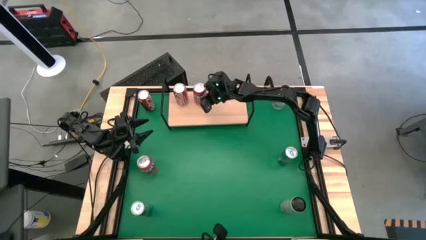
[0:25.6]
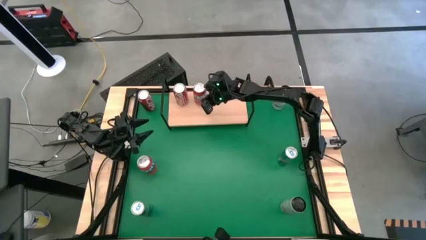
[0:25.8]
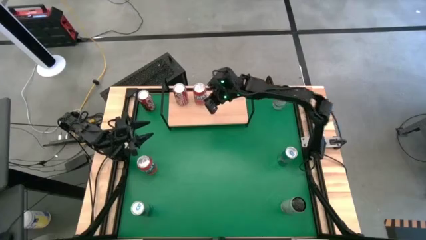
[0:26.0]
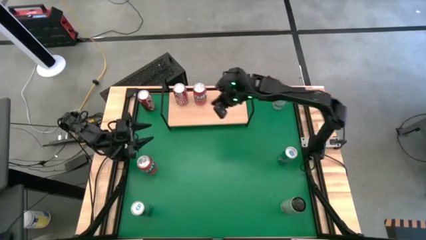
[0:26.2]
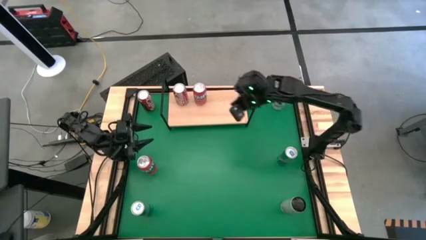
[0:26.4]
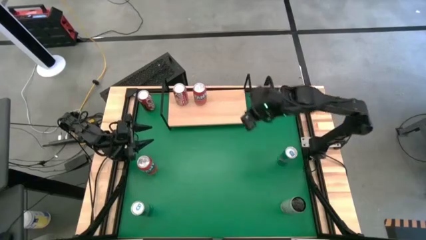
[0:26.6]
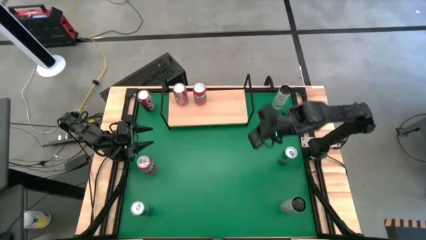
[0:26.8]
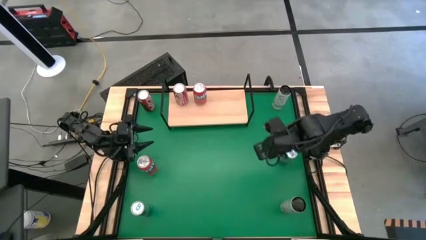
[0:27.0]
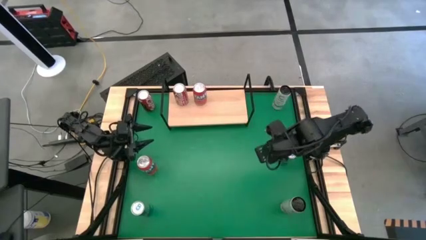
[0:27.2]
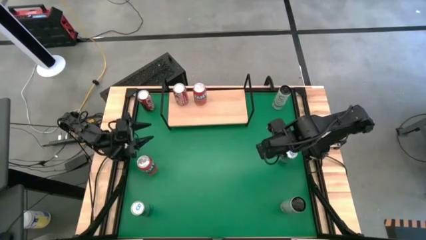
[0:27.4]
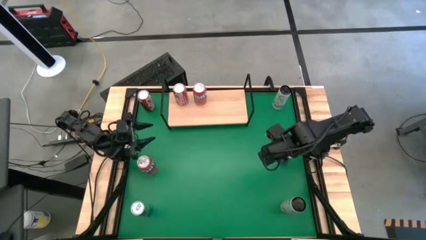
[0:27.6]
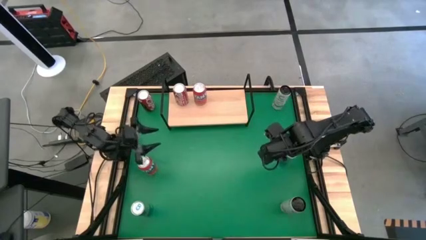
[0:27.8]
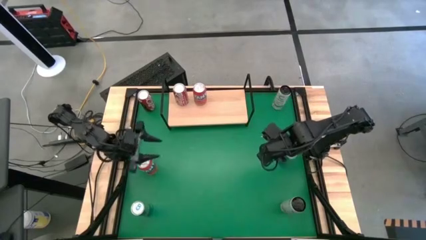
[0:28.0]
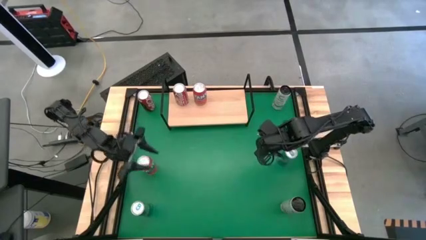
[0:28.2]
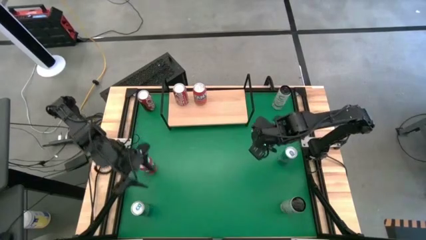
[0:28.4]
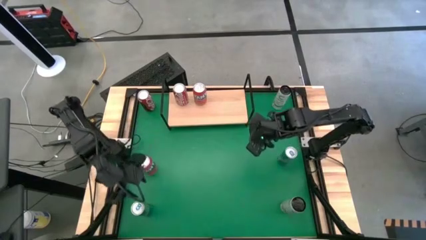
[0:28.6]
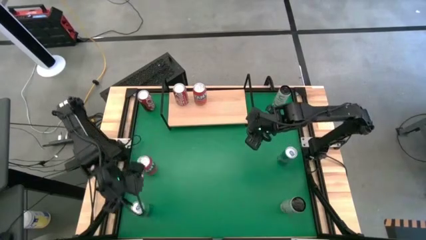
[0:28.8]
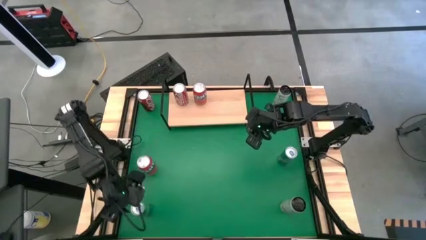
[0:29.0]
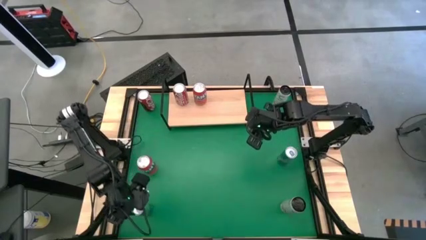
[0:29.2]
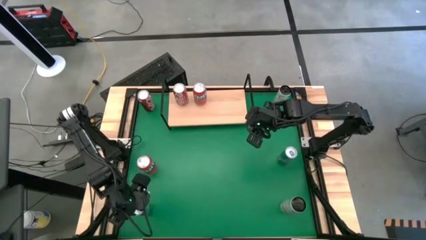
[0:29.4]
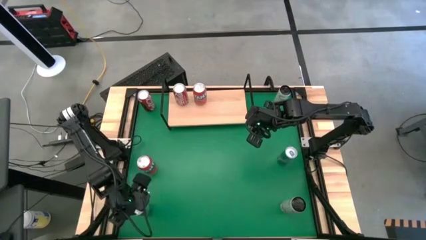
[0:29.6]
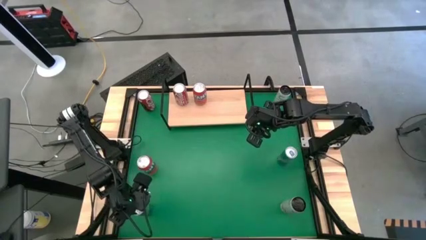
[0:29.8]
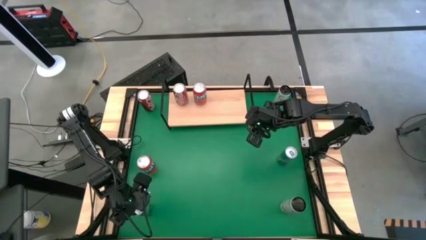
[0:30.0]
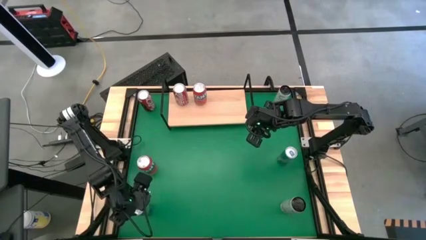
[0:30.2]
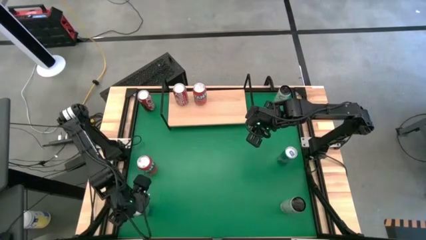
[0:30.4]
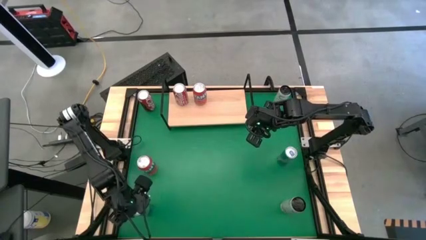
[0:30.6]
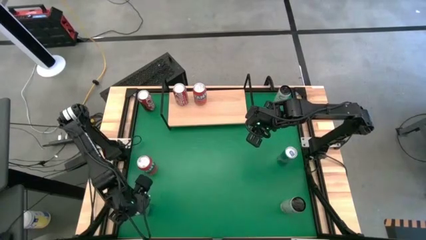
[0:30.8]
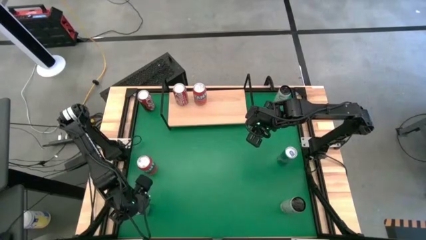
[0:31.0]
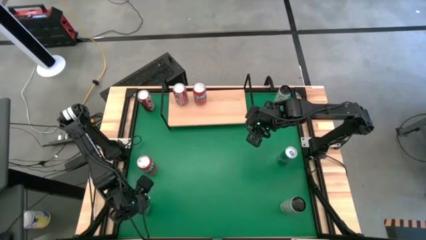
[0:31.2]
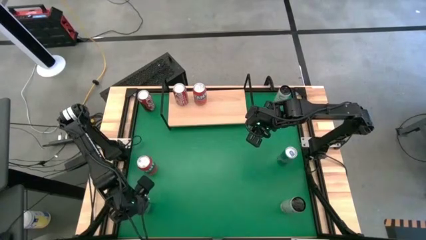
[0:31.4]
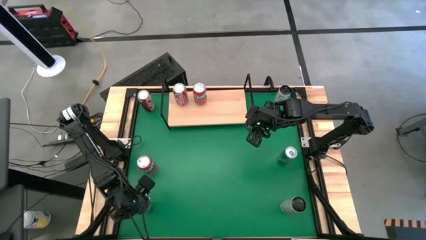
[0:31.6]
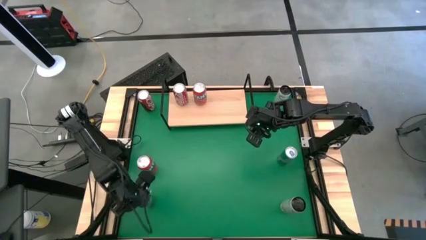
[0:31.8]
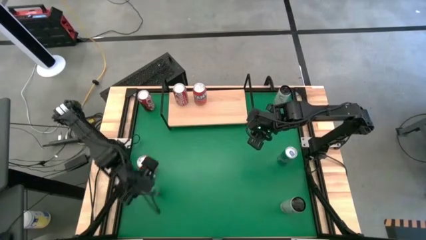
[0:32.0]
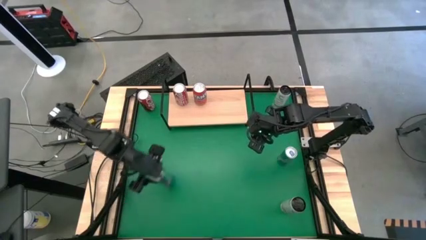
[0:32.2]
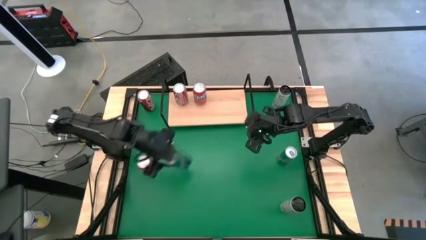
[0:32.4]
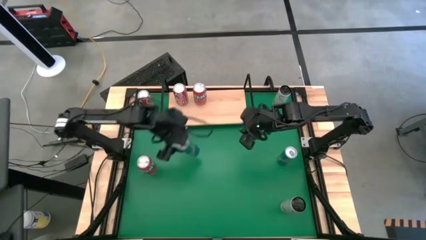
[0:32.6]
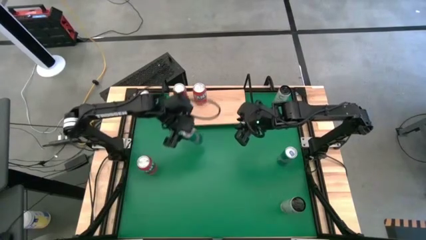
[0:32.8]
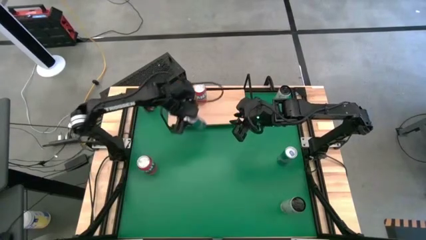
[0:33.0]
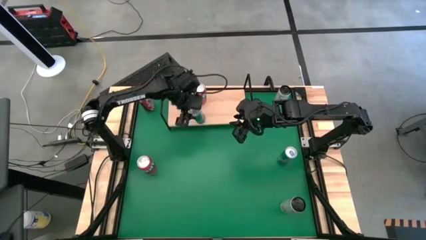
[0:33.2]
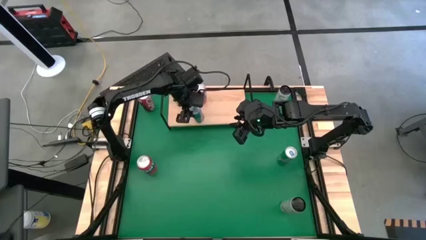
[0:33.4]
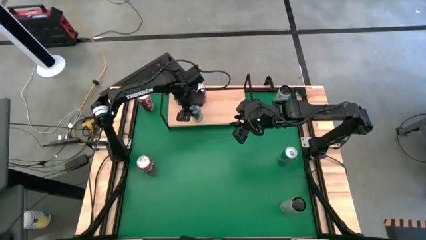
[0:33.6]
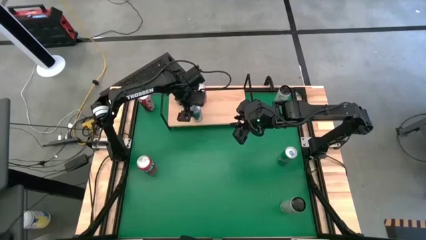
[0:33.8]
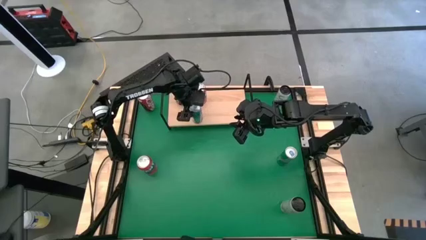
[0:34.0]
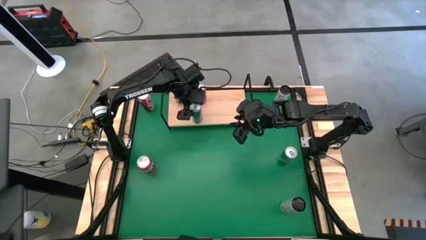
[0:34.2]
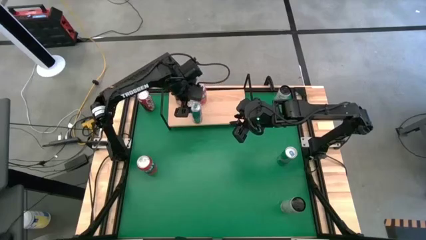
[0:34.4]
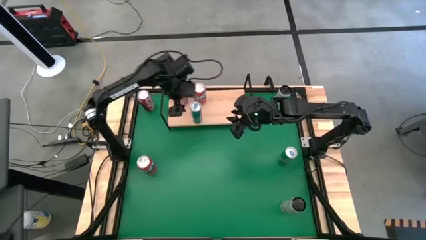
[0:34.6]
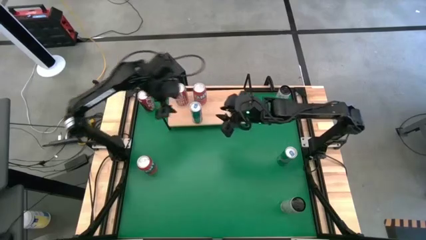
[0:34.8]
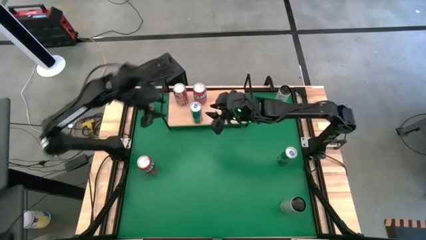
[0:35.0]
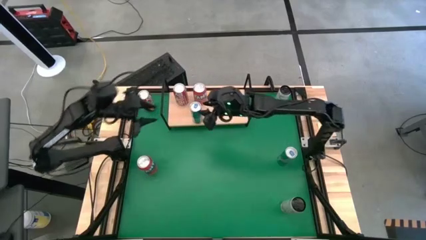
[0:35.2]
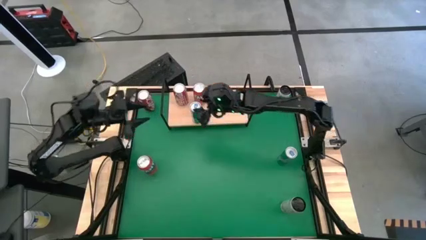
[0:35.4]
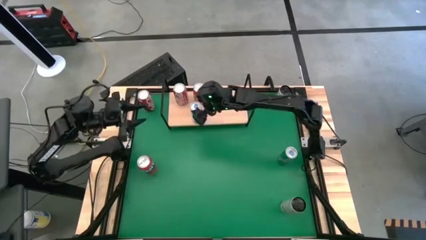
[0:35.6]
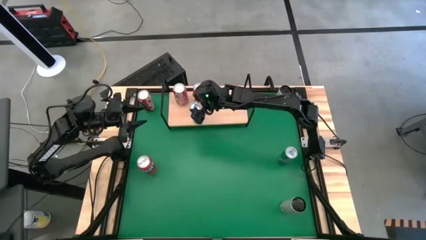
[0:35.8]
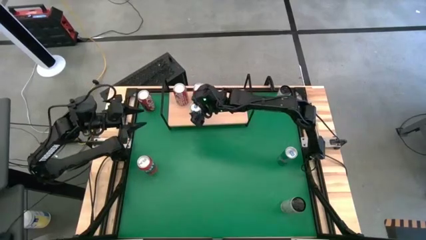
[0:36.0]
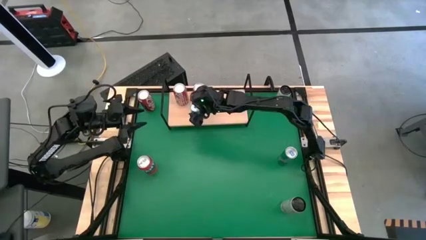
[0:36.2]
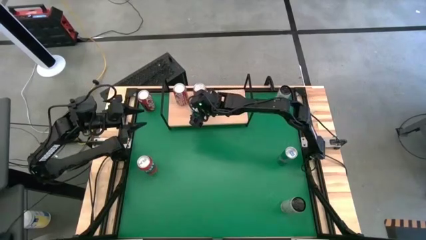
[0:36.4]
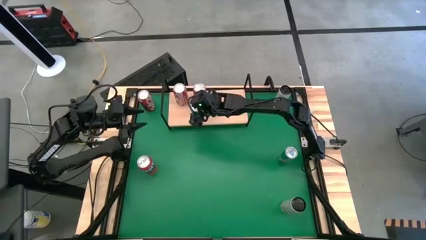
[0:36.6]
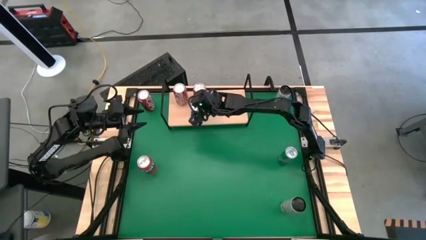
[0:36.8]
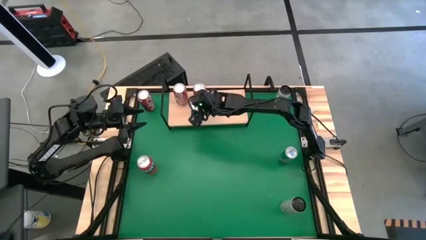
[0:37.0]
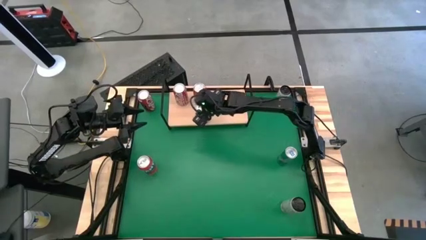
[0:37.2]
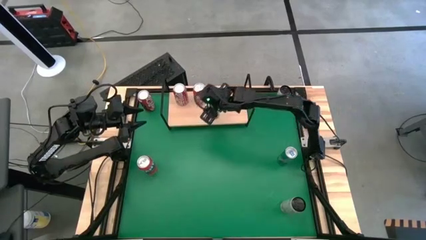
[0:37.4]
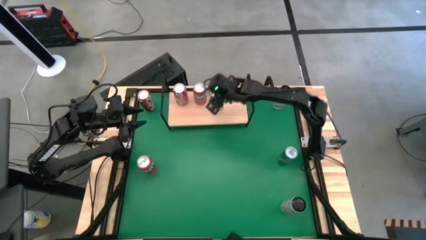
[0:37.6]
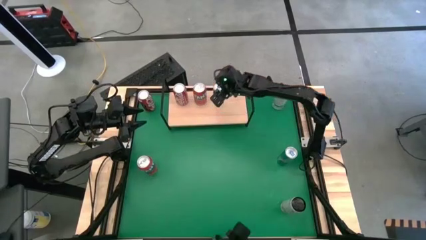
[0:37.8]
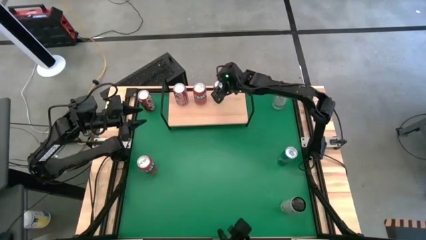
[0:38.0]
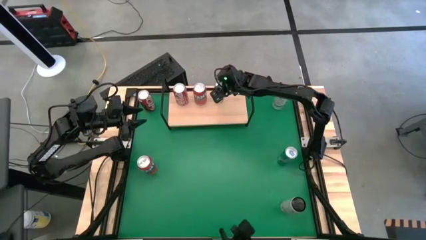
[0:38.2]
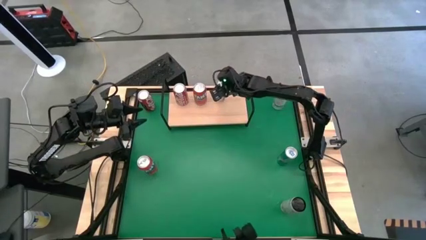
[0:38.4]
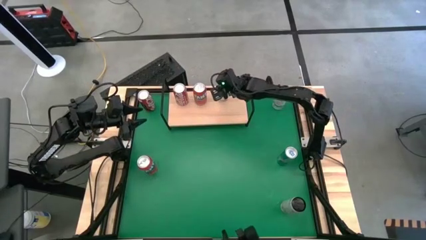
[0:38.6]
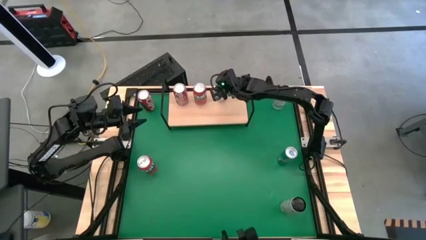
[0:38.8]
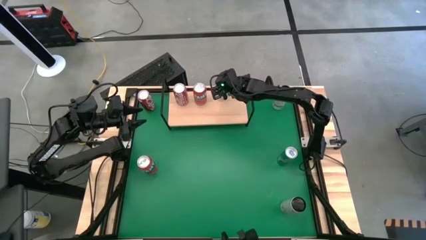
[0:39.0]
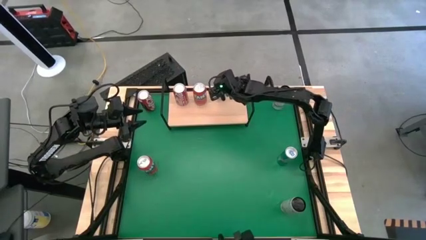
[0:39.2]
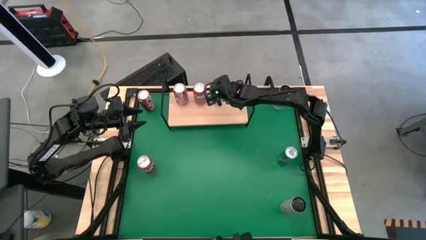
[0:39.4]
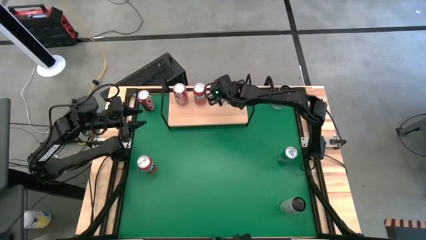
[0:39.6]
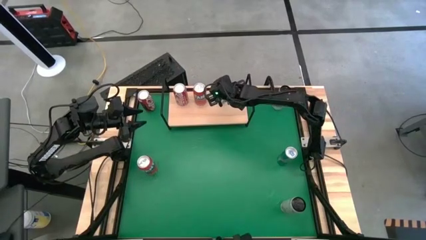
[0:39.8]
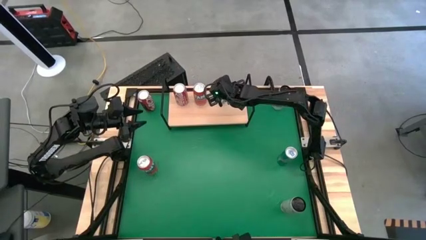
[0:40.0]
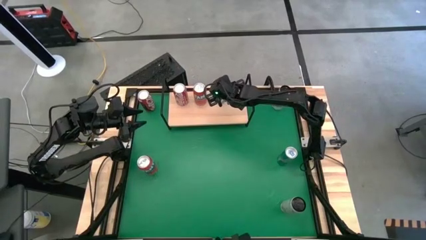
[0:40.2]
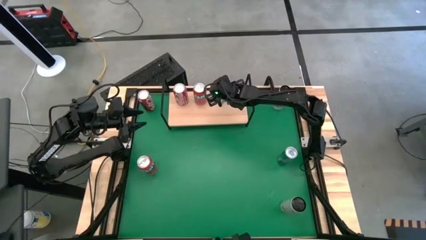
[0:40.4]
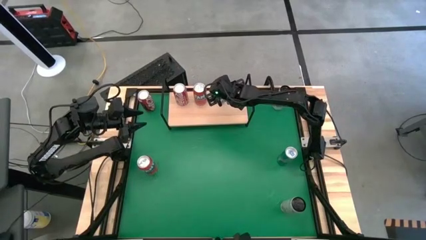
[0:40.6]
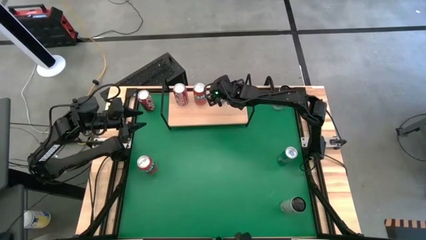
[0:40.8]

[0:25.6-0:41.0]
Task: Place canned beverage on shelf
Put the left blue soda can on the shelf

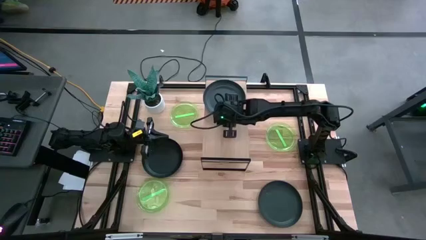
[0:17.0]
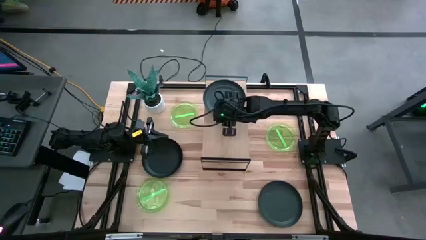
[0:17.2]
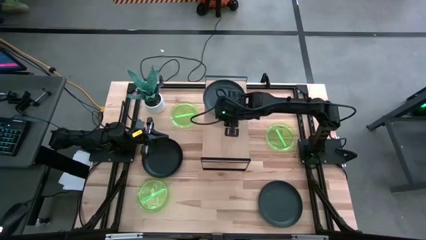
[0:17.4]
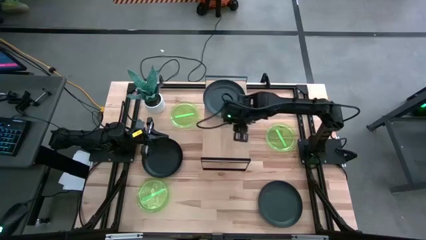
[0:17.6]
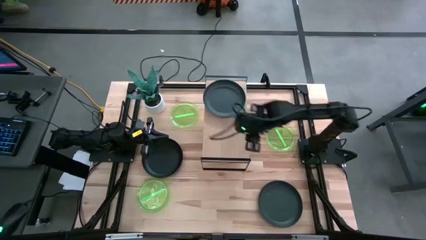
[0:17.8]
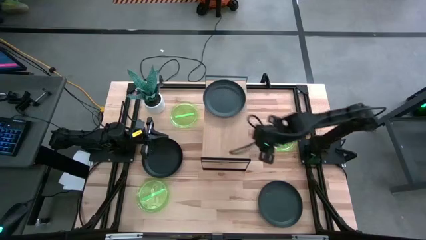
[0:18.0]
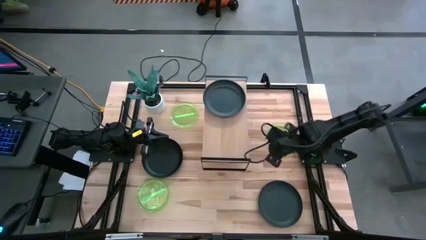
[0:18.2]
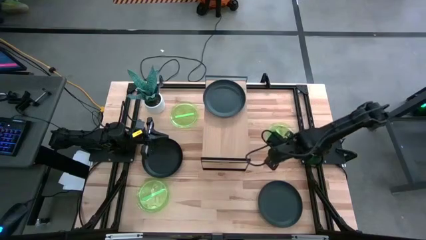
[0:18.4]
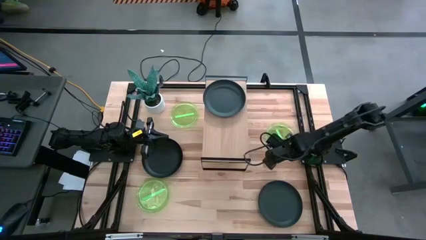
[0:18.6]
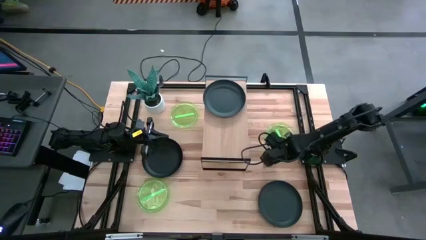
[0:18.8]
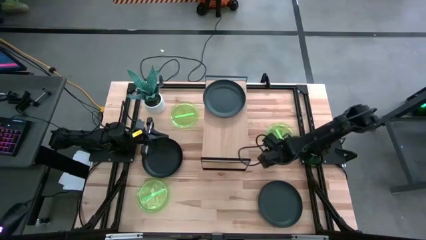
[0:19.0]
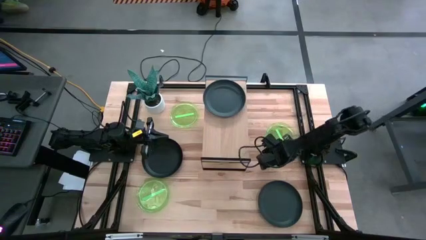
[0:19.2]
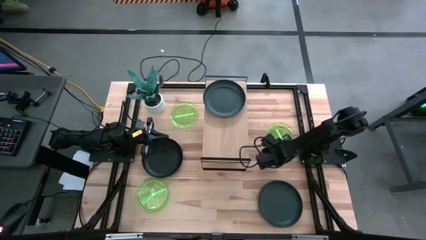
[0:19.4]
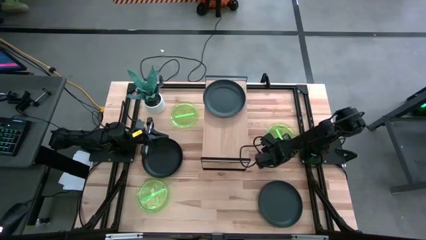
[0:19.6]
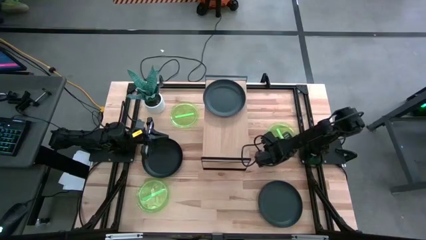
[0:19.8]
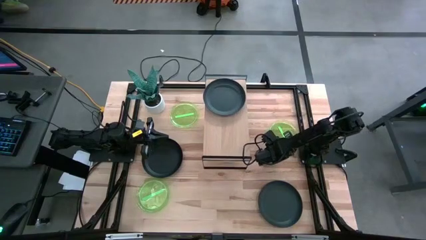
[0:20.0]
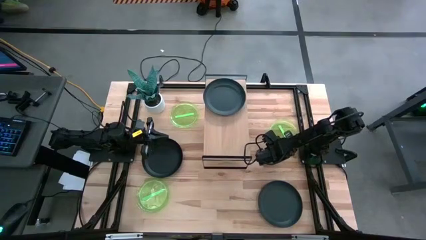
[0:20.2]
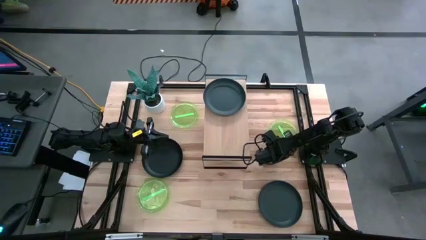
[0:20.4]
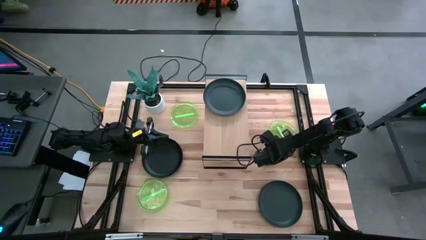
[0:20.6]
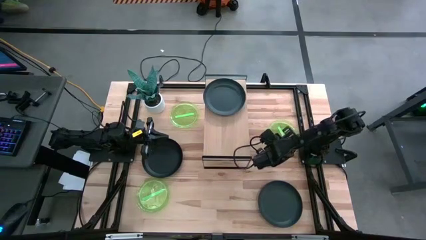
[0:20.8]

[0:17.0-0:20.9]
Task: Place and stack plates onto a shelf
Put the right green plate on the shelf
